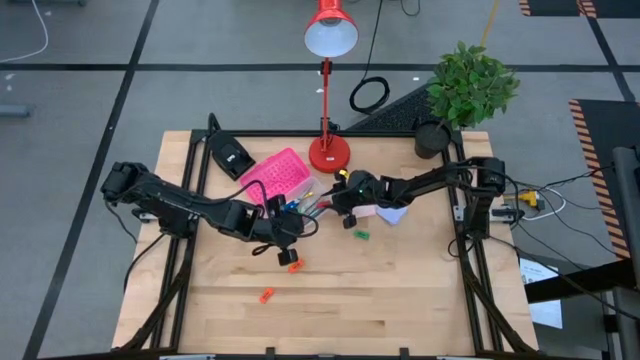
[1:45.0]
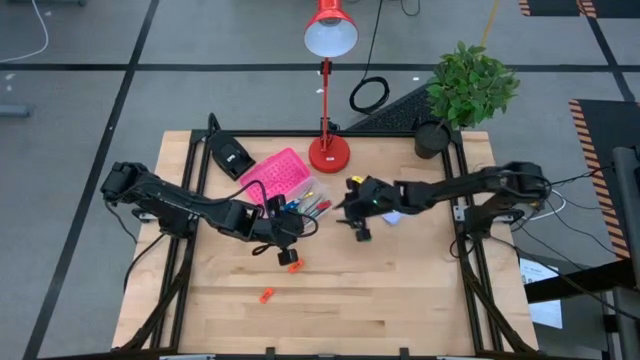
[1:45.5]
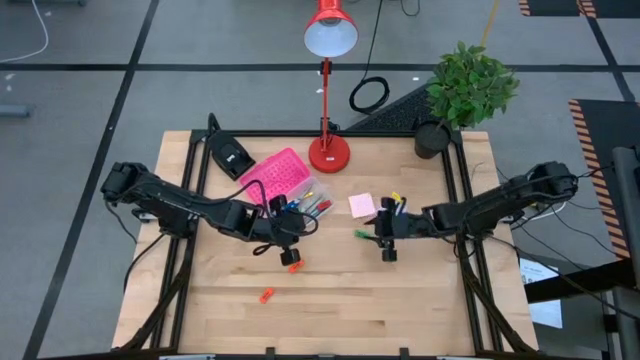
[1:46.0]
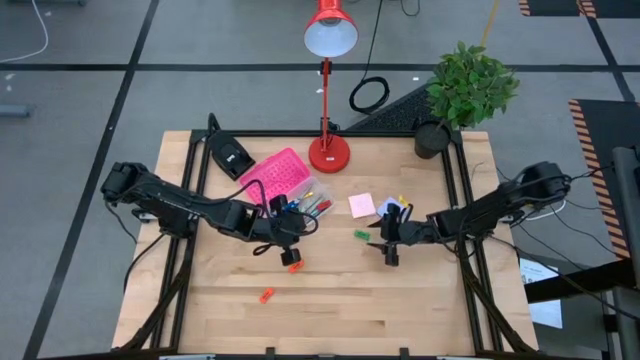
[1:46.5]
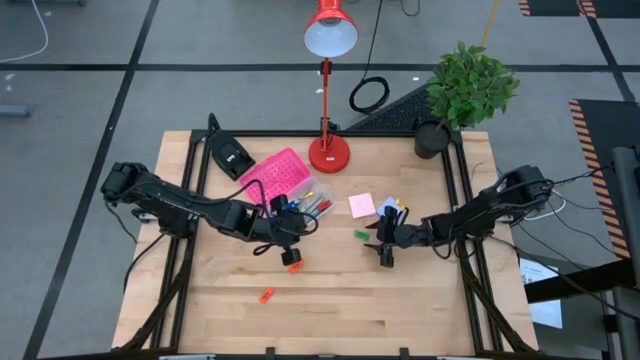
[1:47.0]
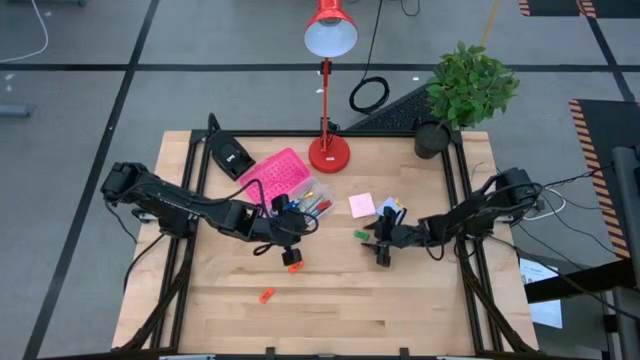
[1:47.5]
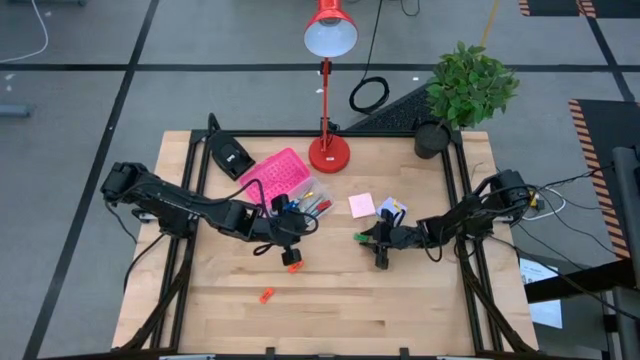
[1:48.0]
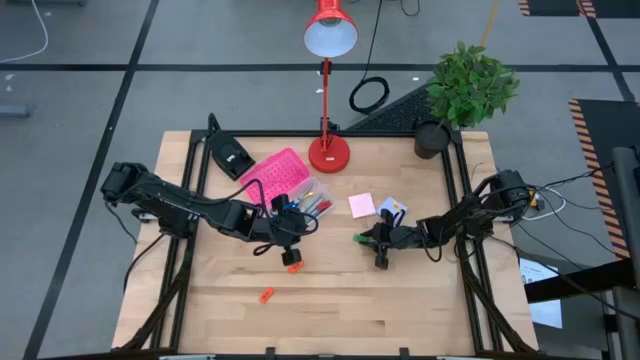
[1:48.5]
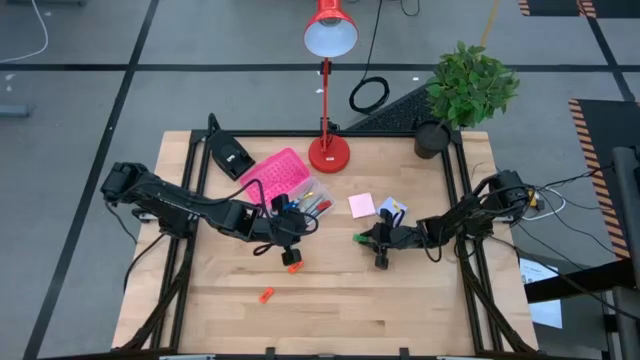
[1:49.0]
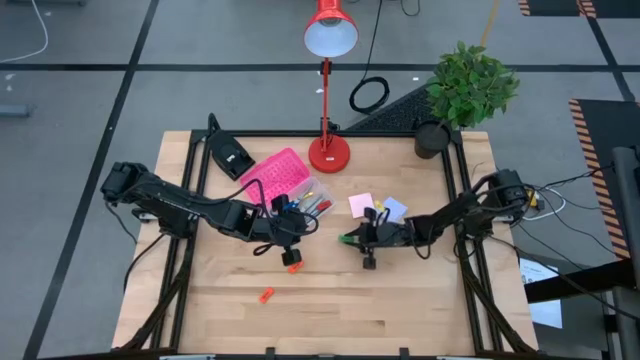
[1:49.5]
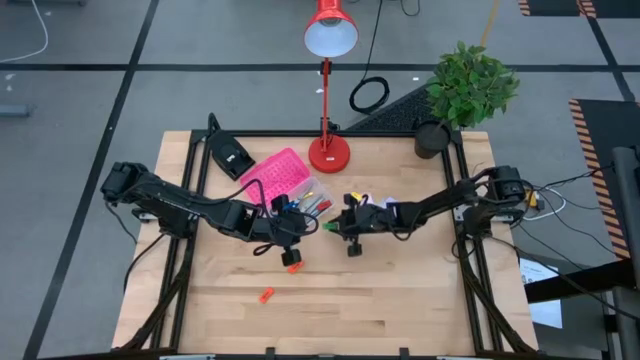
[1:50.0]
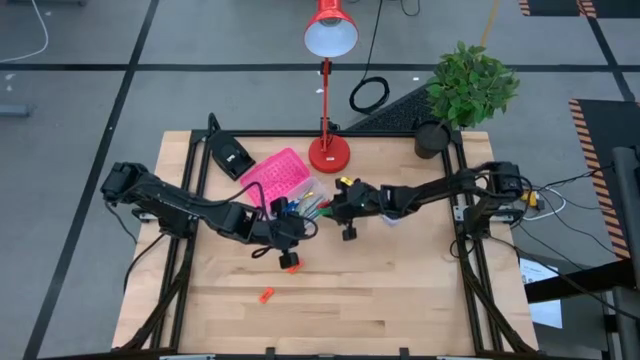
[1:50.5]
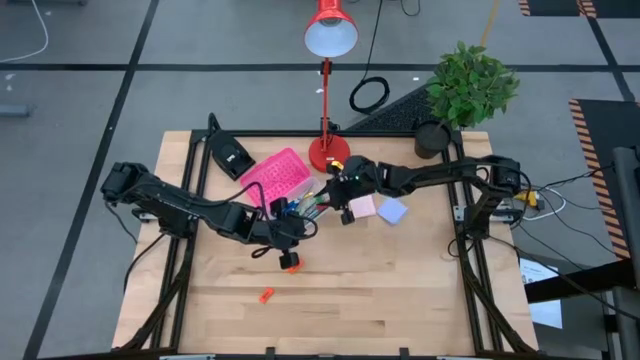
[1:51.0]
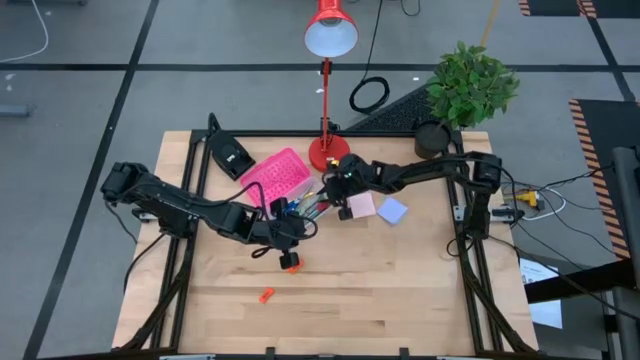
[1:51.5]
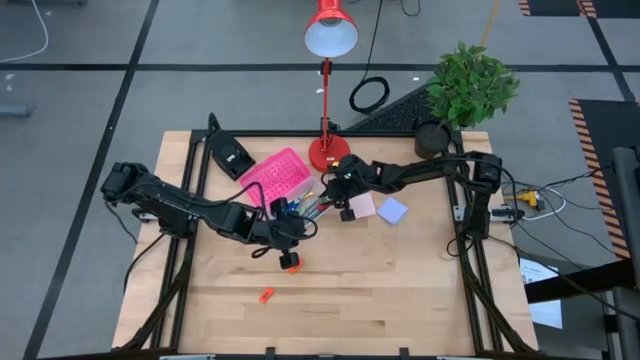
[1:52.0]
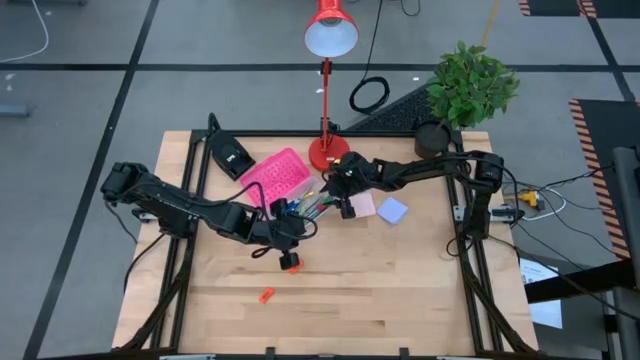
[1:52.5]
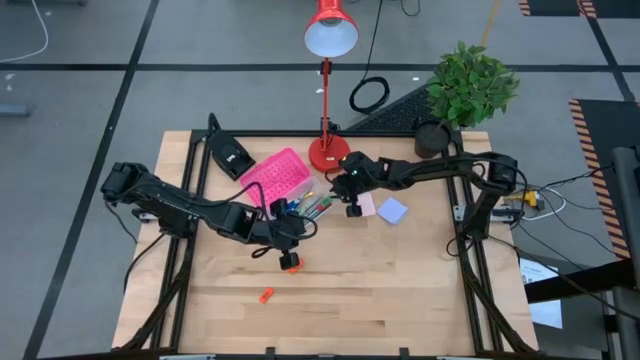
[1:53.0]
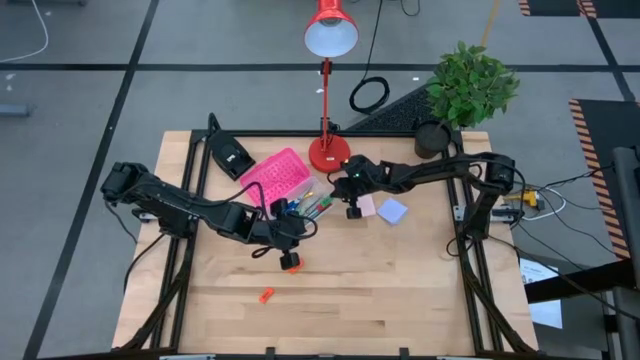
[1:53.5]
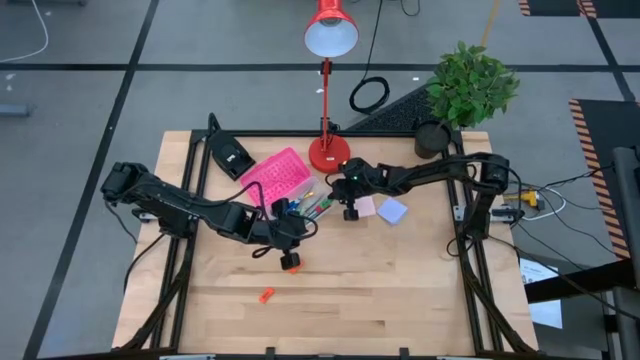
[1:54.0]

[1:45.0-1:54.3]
Task: Pack school essentials
Put the green eraser into the pink supply box

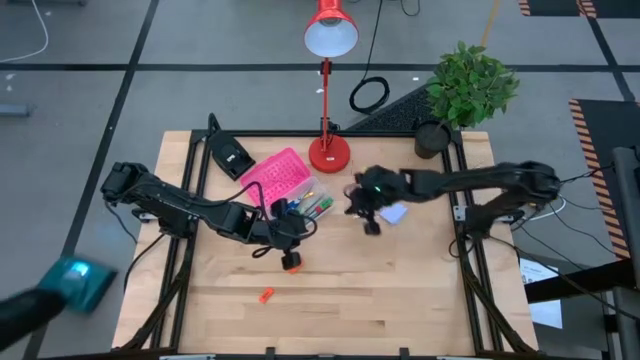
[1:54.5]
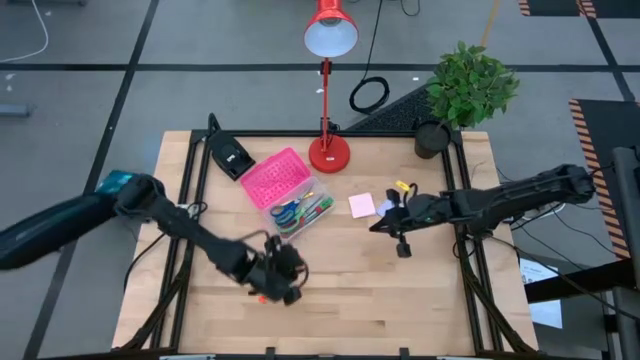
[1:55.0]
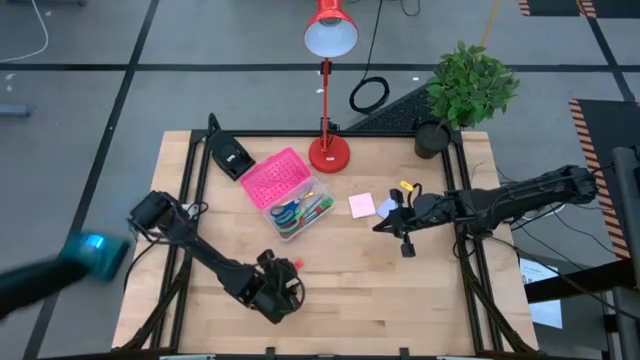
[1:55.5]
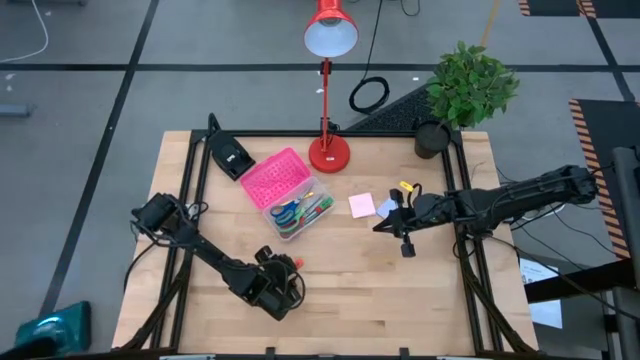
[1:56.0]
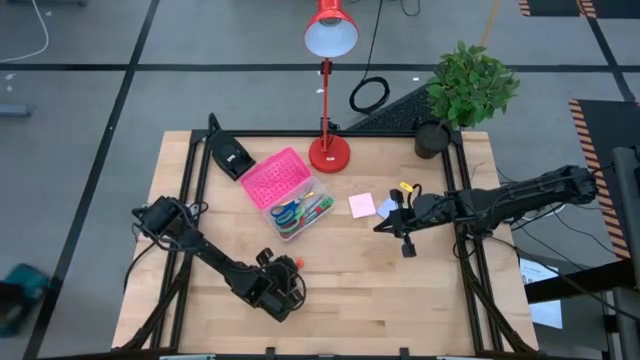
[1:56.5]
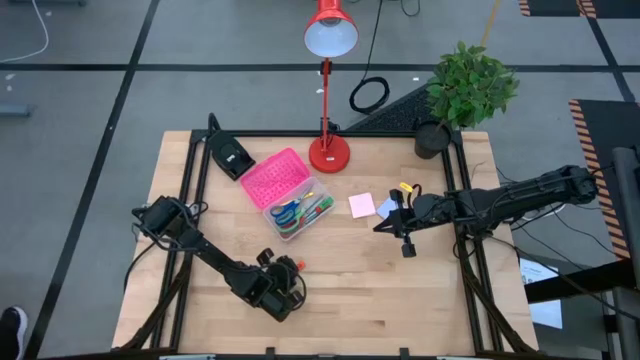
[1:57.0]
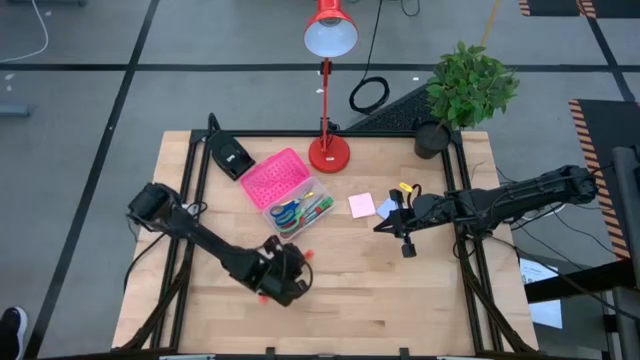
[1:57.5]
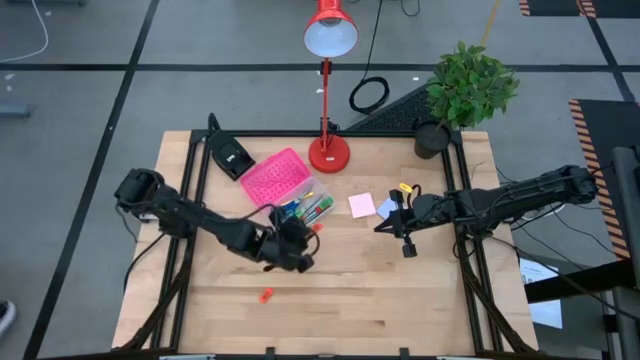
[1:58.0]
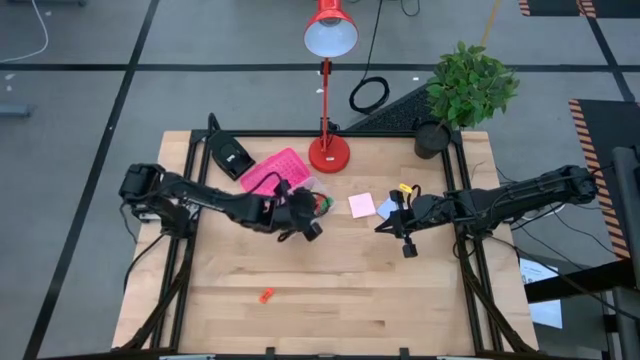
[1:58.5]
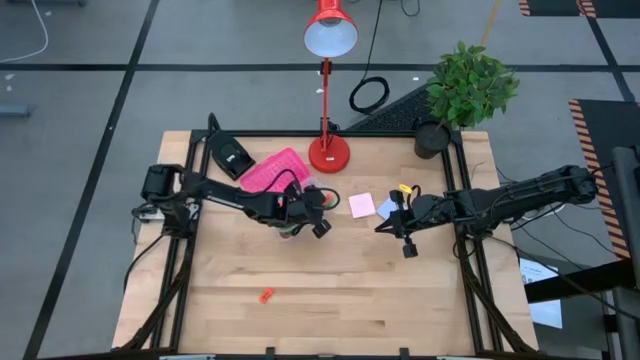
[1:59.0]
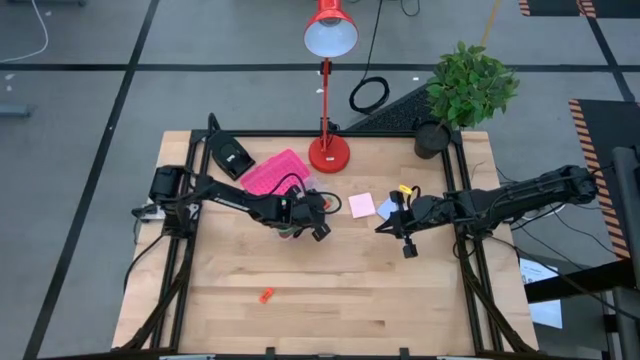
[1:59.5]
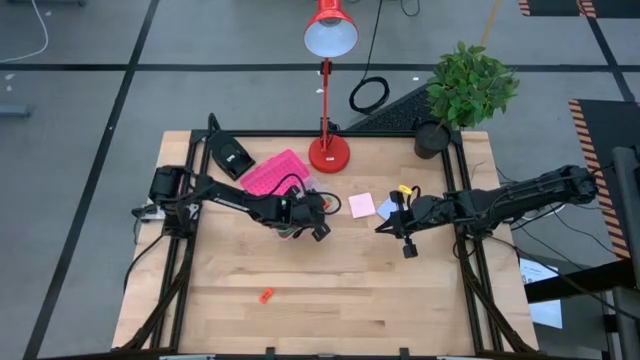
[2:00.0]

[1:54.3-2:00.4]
Put the top orange eraser into the pink supply box

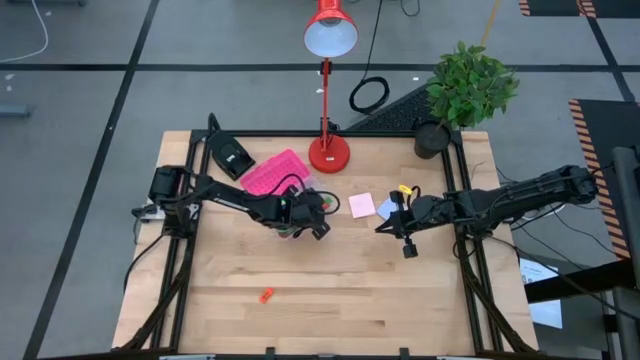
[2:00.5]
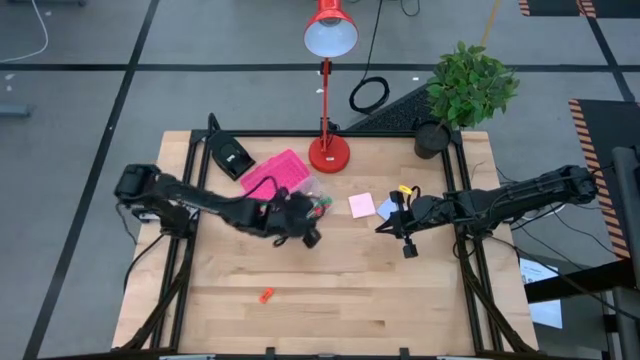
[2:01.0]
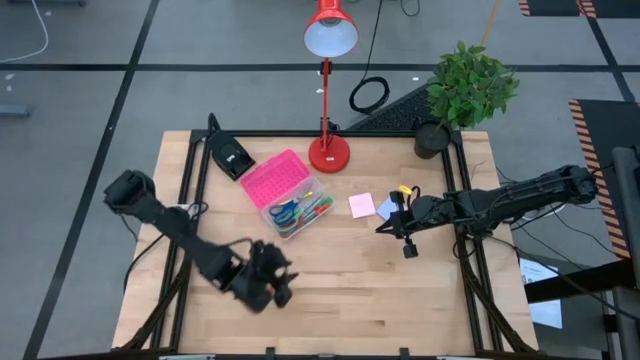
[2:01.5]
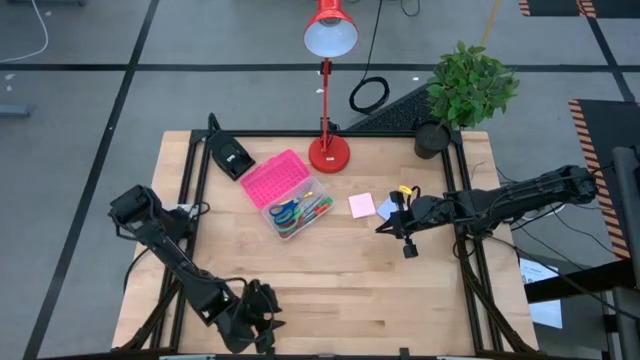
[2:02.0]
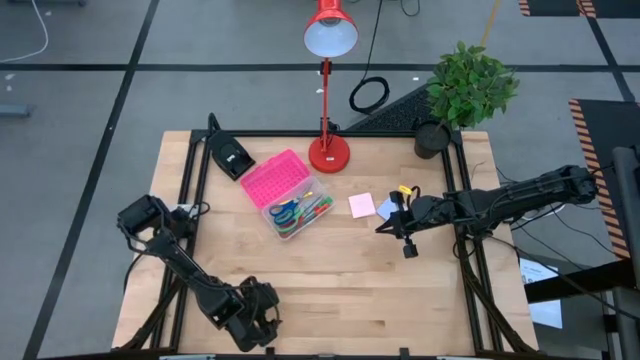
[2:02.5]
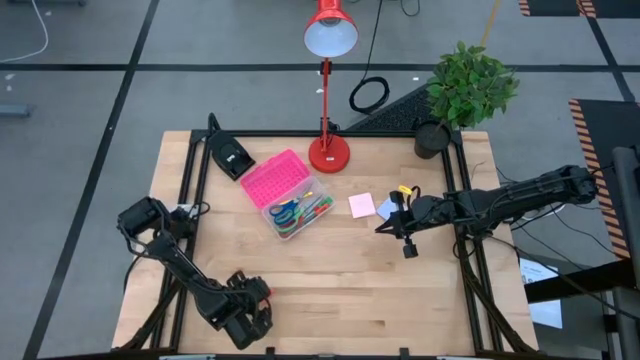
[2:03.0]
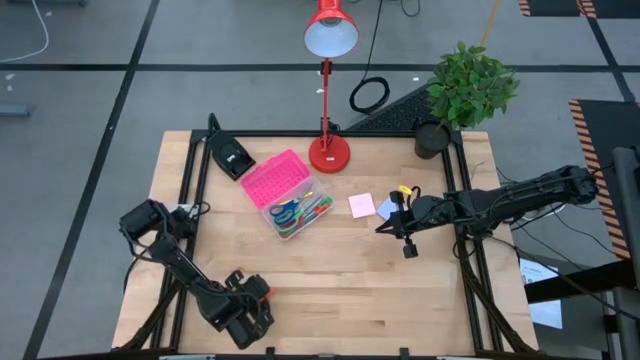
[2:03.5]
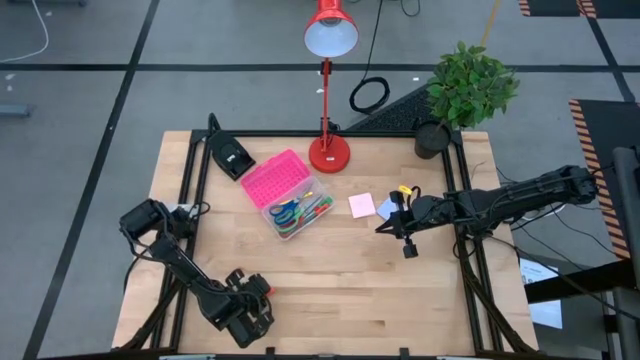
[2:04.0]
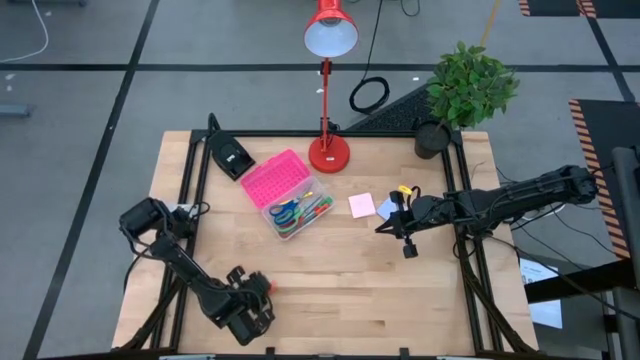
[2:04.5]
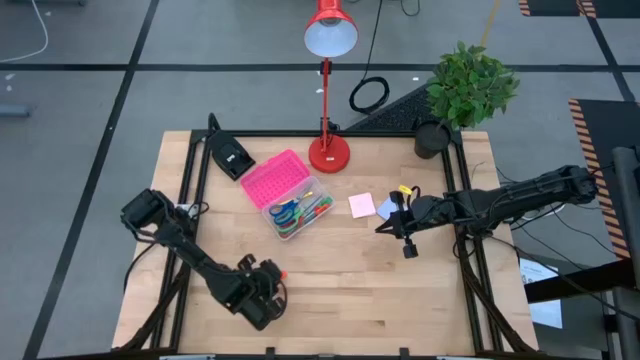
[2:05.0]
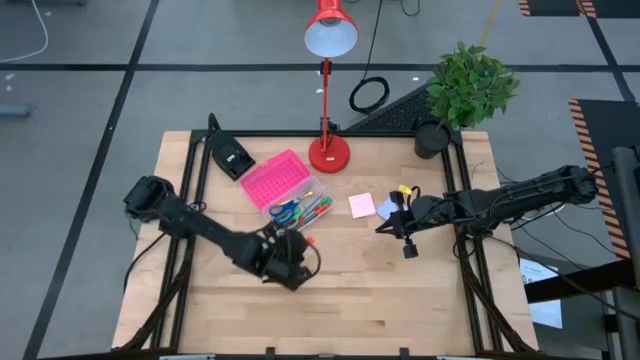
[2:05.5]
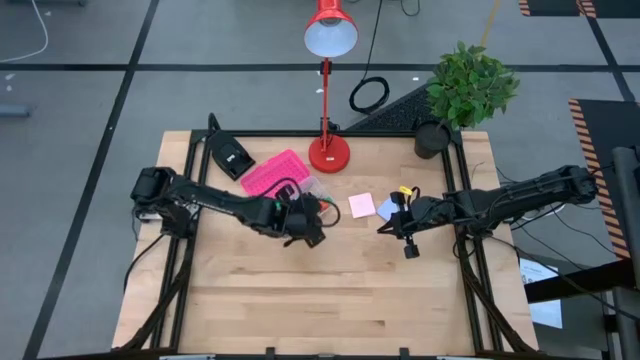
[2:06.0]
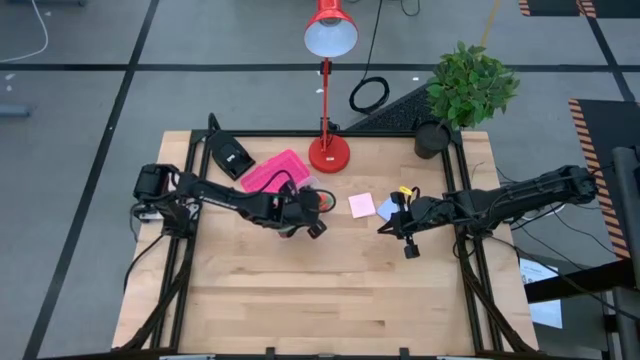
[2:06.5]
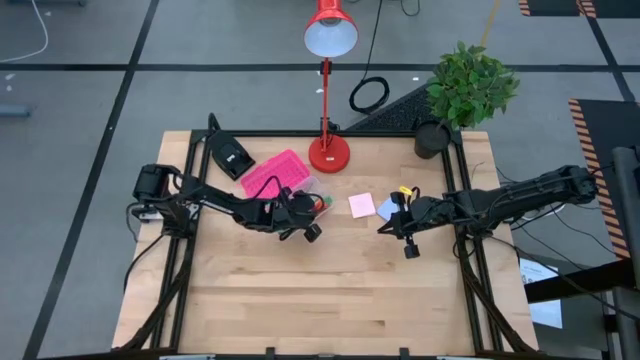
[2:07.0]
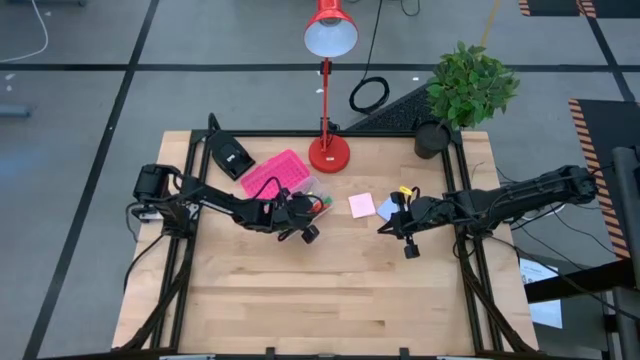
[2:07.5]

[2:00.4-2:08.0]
Put the orange eraser into the pink supply box
